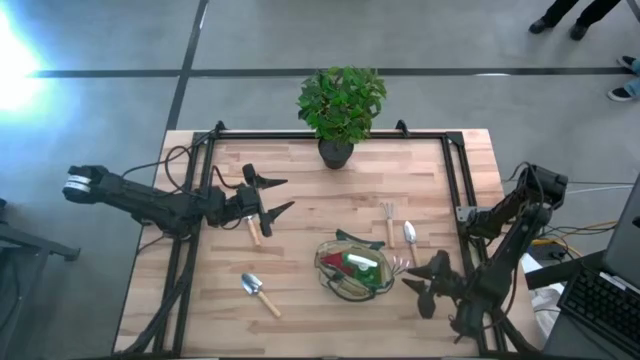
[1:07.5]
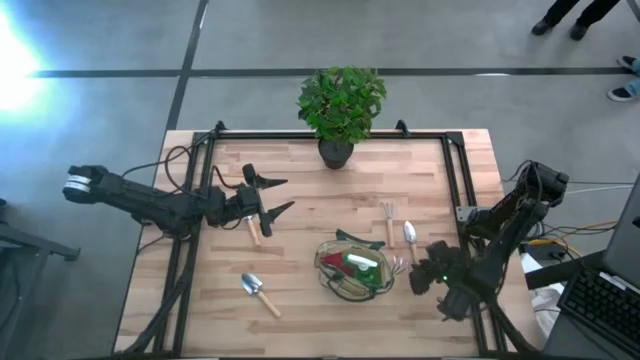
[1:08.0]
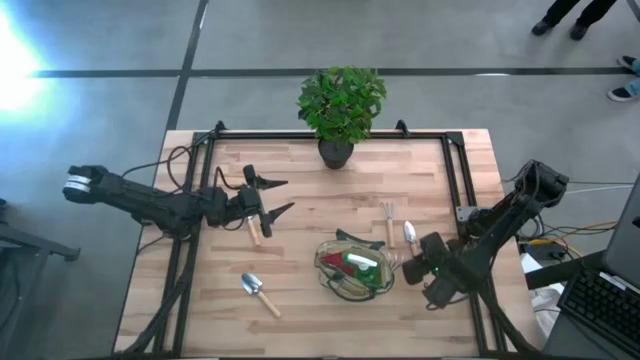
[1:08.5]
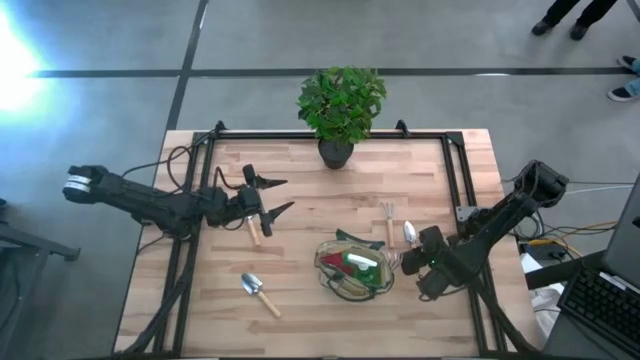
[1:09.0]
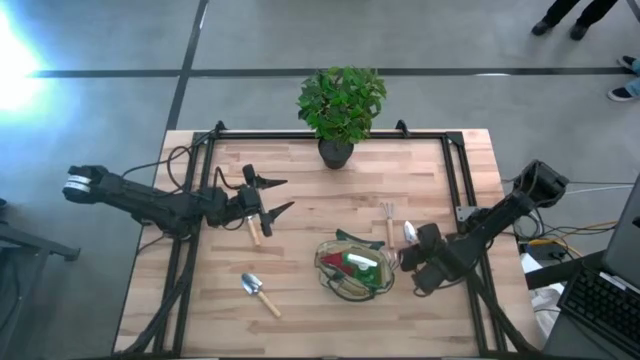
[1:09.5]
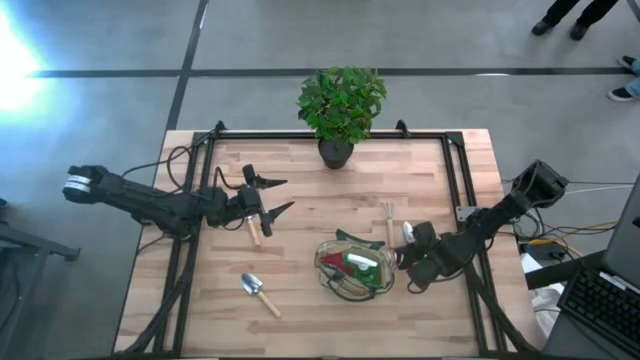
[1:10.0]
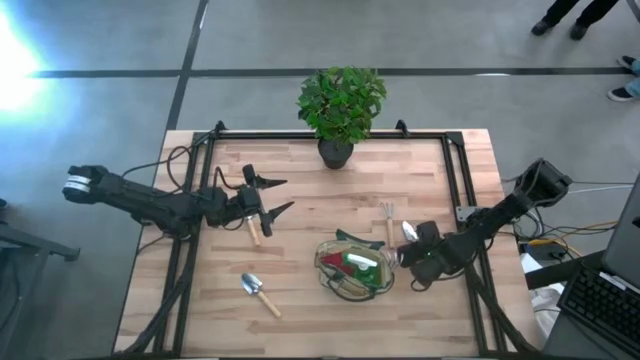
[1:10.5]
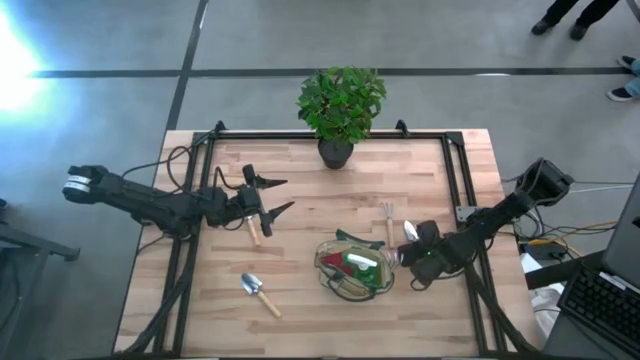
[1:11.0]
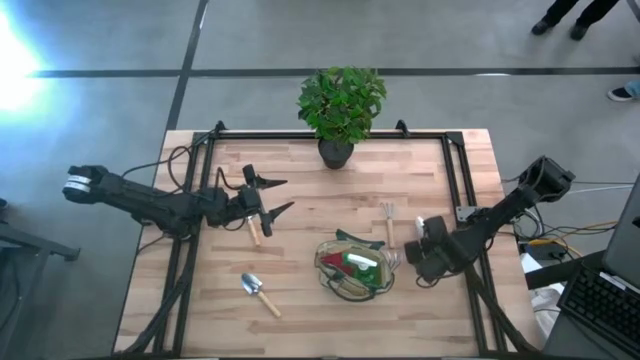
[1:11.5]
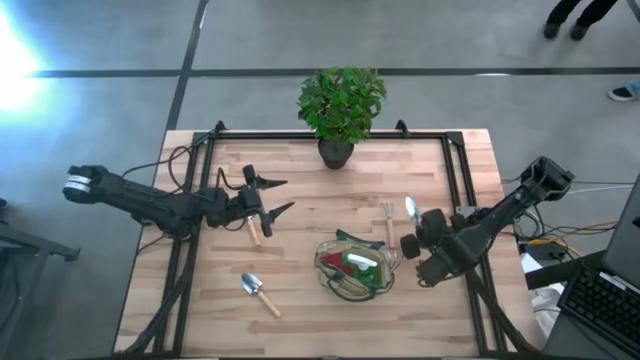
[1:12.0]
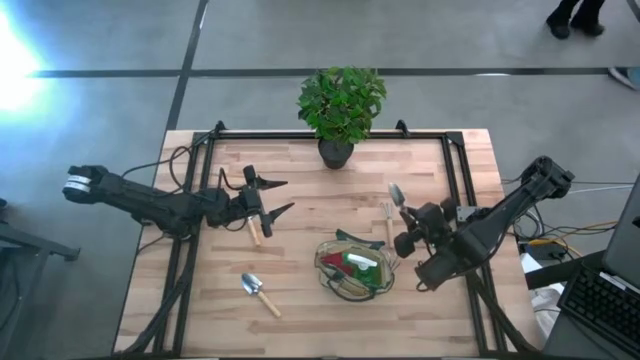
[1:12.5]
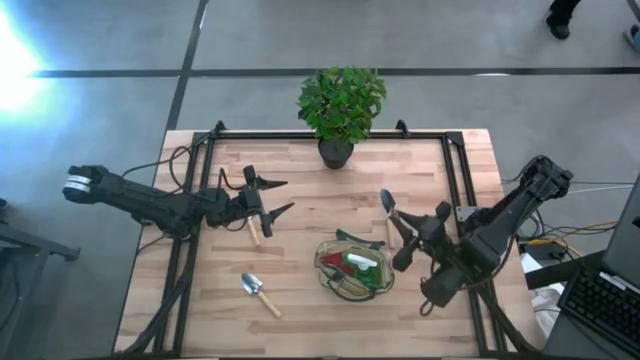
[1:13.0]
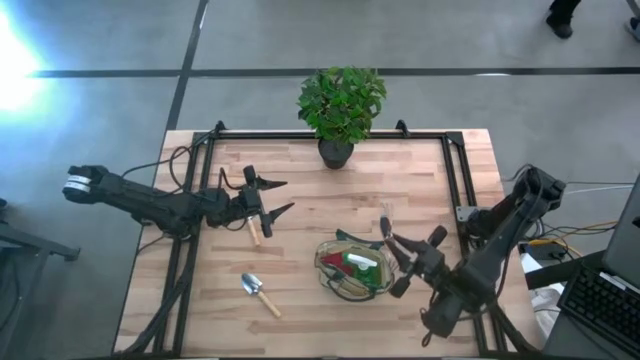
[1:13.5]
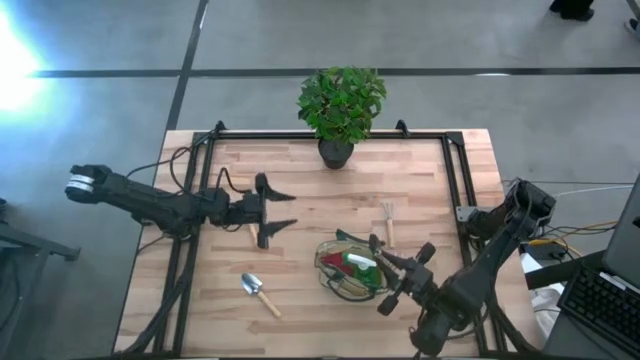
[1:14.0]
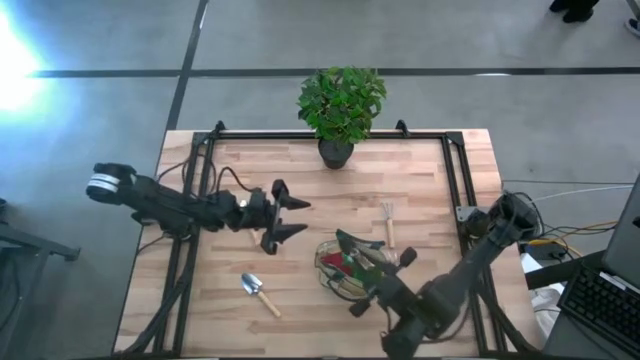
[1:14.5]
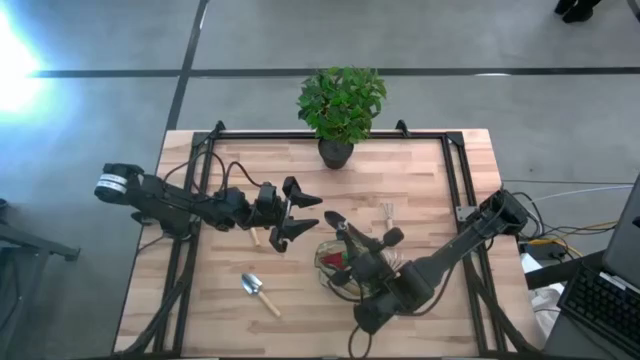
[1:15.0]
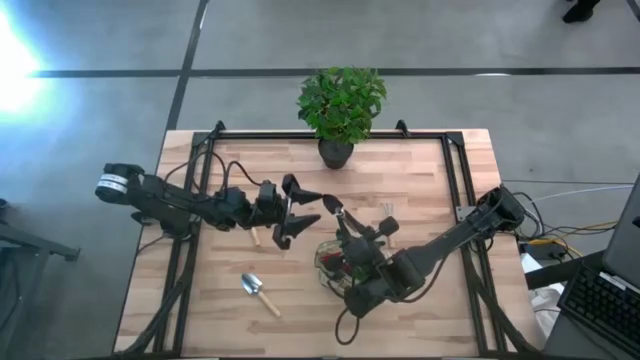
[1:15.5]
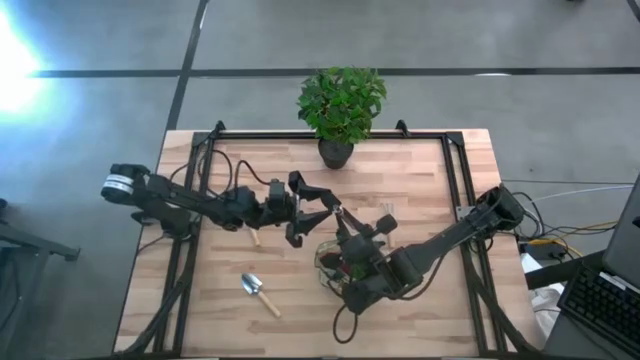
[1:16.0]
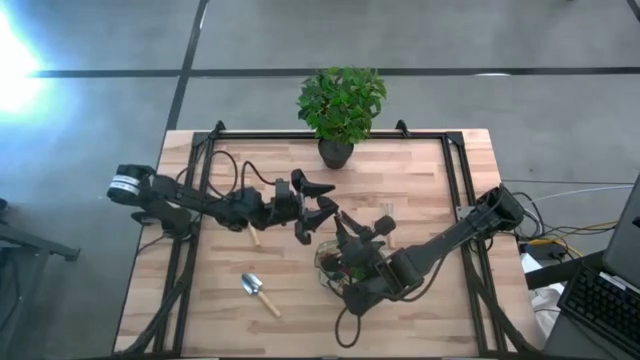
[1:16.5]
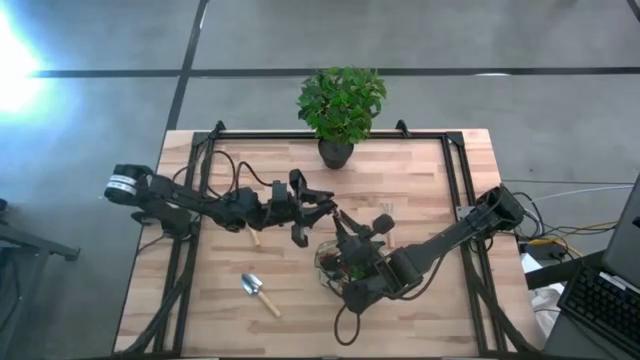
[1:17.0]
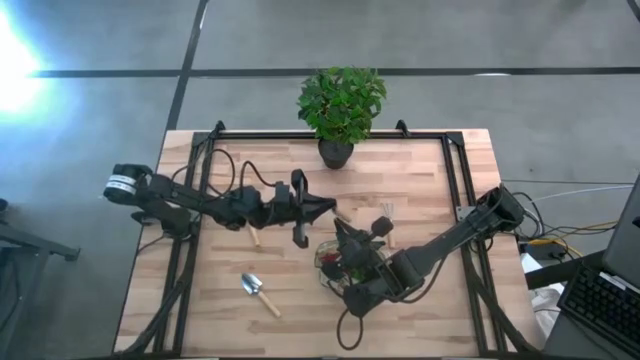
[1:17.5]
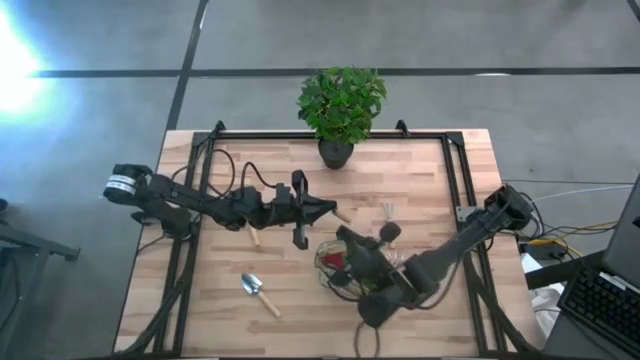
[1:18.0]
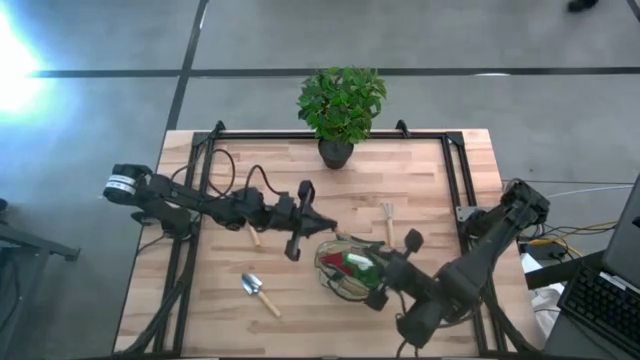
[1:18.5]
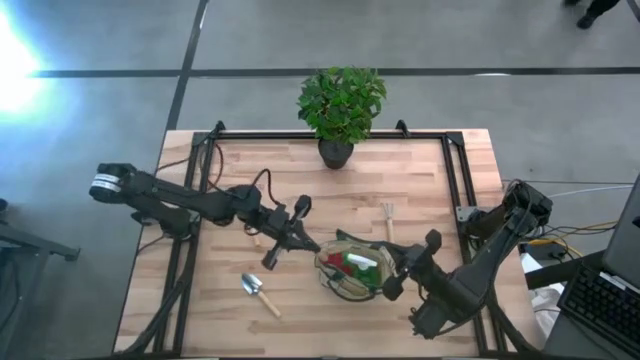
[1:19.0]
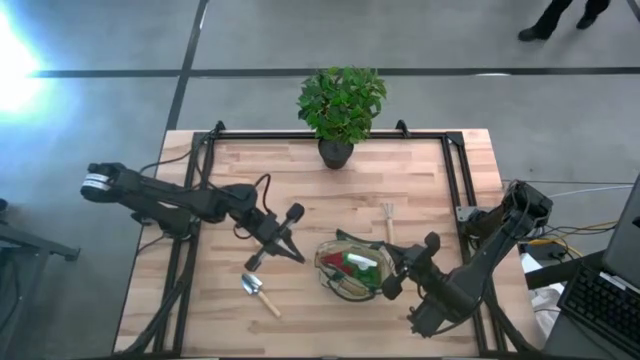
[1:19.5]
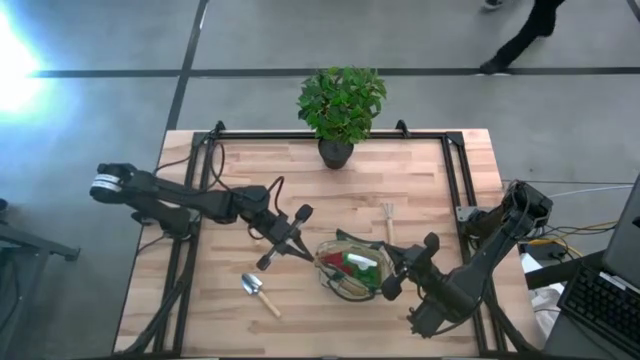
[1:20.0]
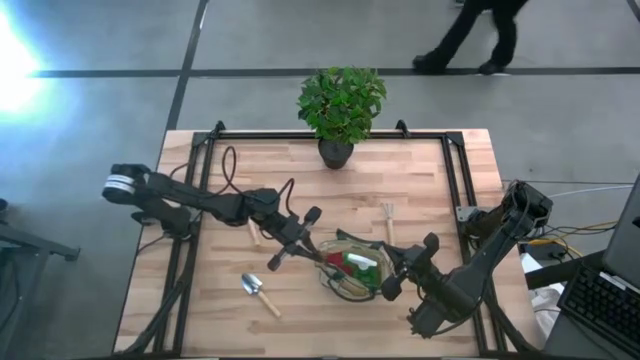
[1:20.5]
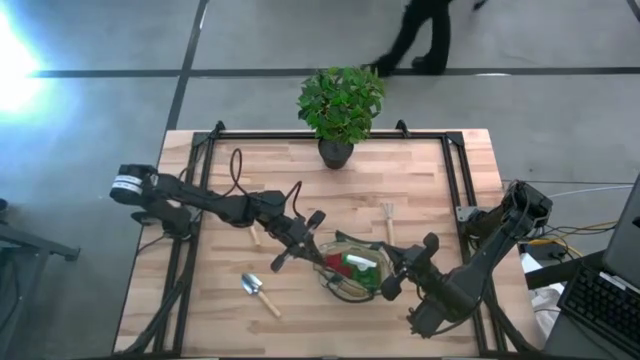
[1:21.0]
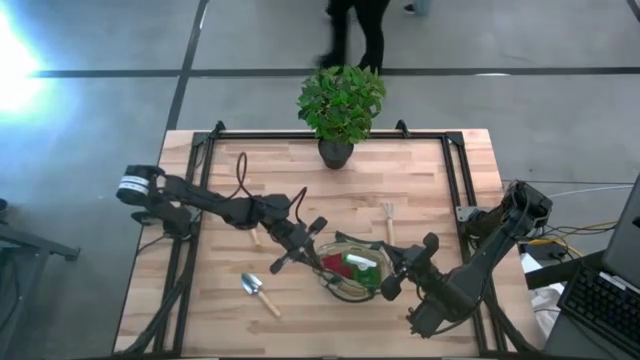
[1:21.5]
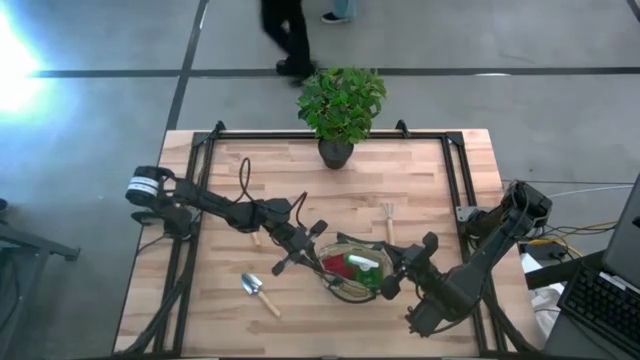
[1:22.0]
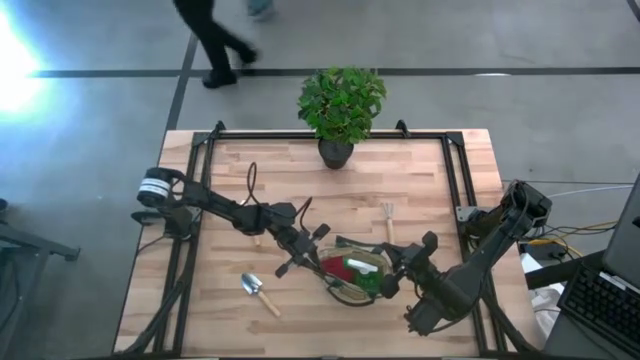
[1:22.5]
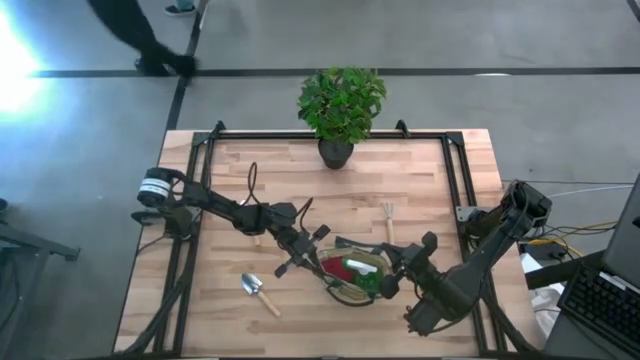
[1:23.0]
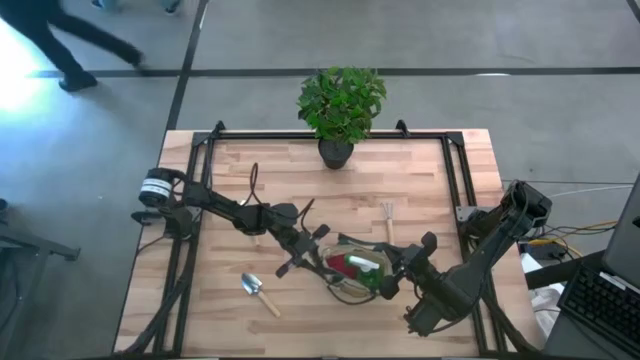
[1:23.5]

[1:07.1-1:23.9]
Task: Pick & Place Garden tools in Gardening bag
Put the top right brown trowel into the green gardening bag

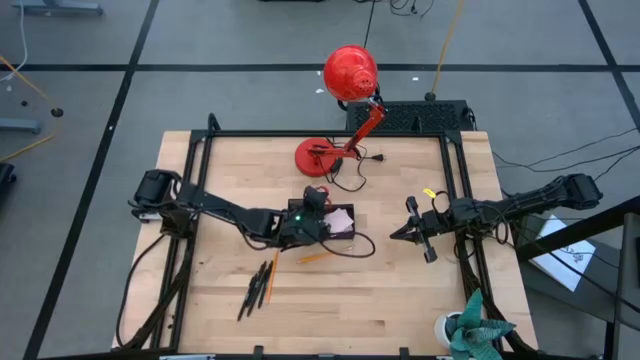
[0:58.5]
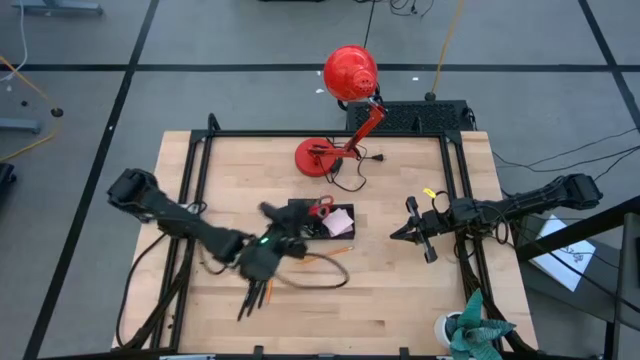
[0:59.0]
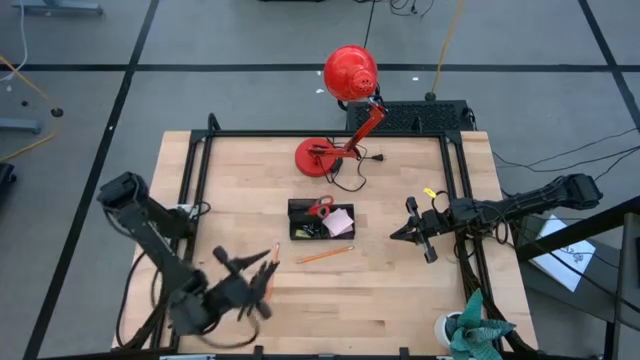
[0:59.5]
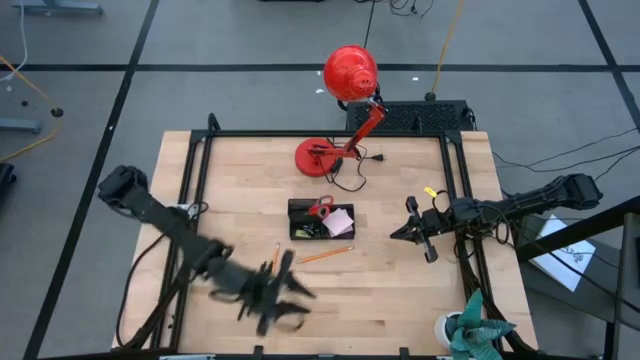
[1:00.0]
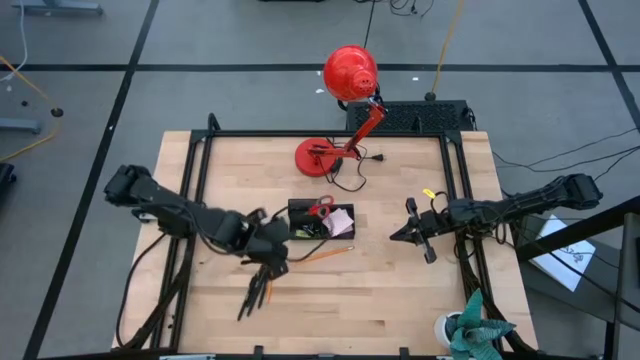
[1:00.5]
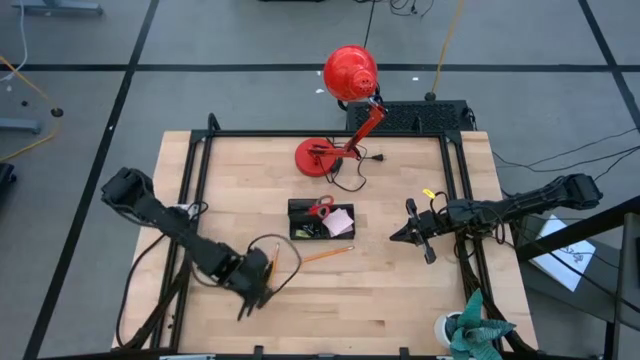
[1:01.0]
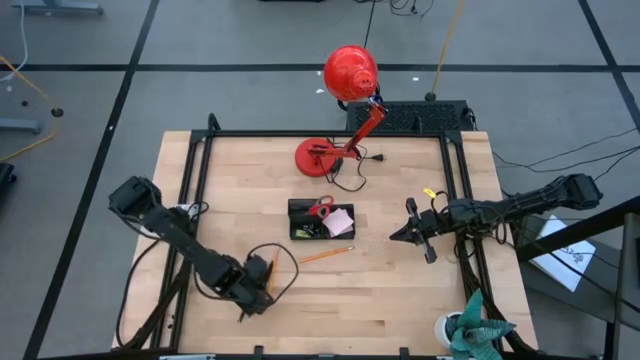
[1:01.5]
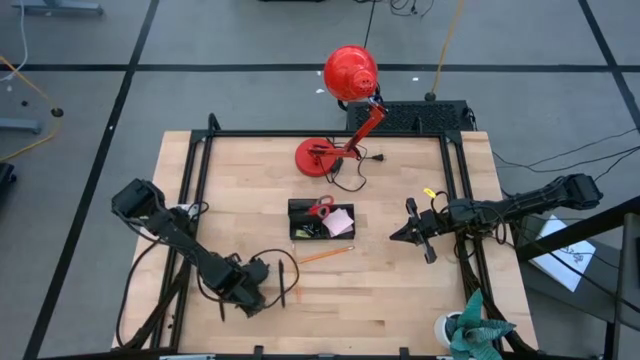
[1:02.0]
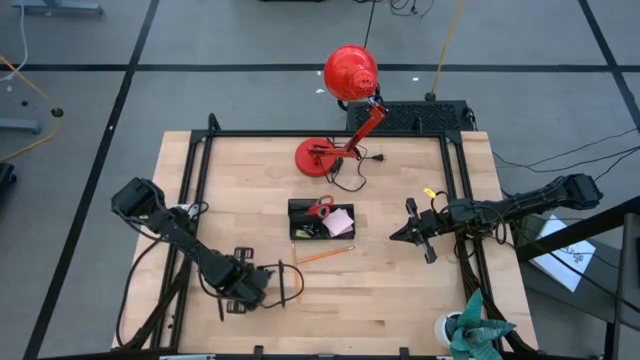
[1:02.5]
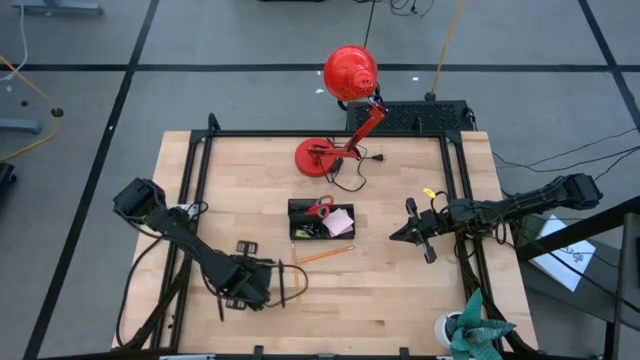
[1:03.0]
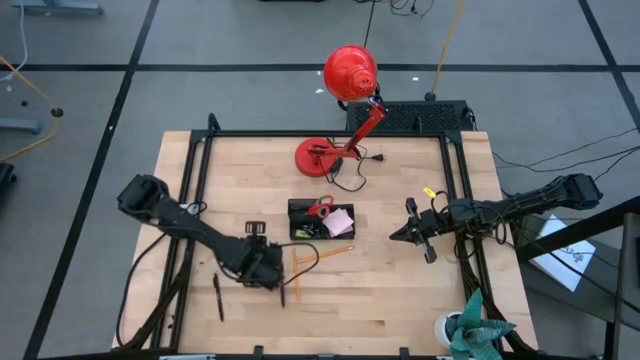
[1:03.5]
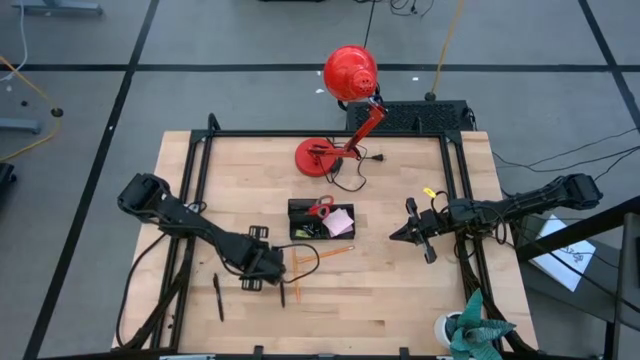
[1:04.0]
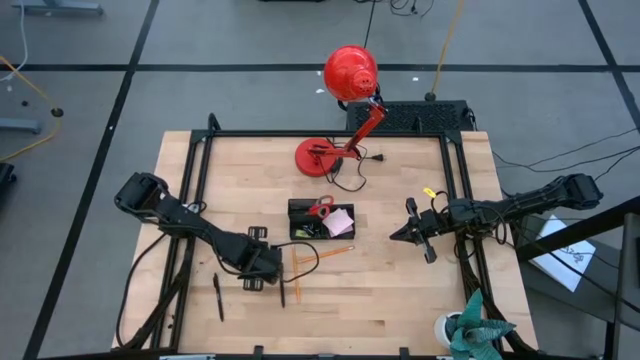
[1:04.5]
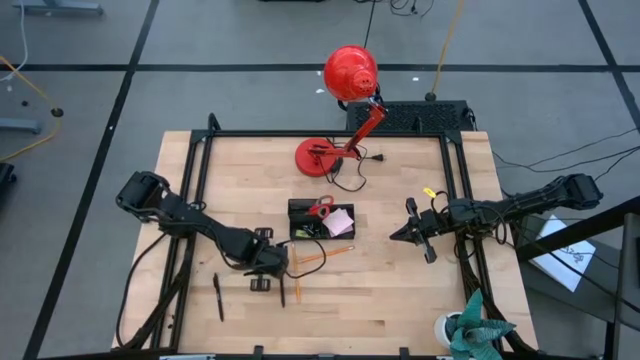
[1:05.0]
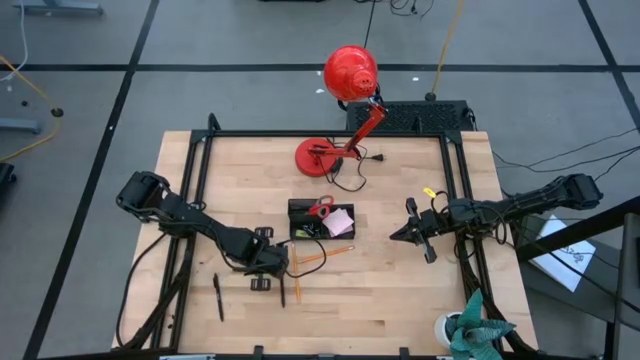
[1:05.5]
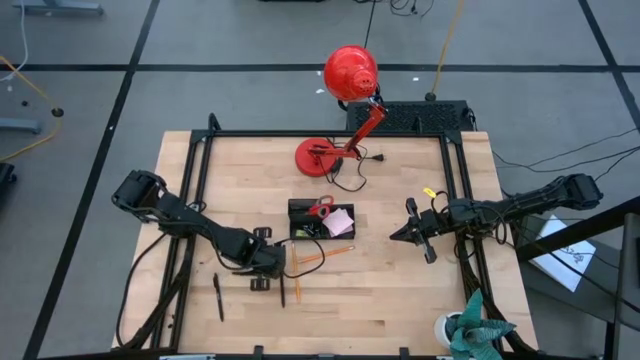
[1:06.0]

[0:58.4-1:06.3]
Task: Pick and place office supplies into organizer
Put the black pen into the desk organizer
